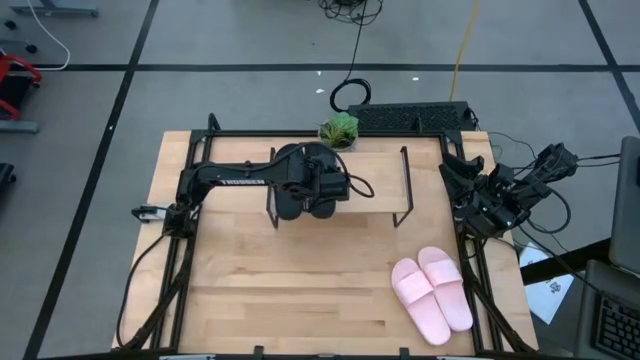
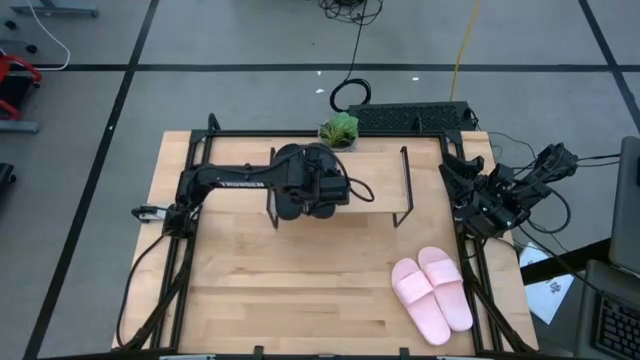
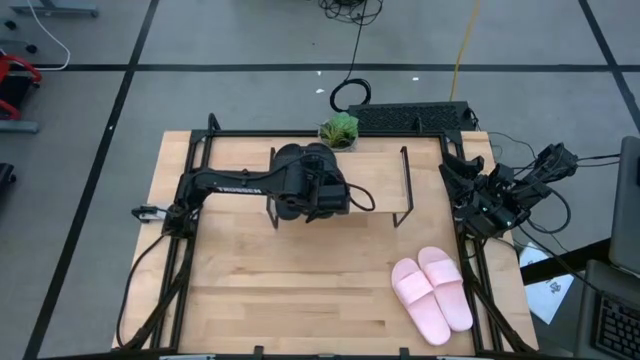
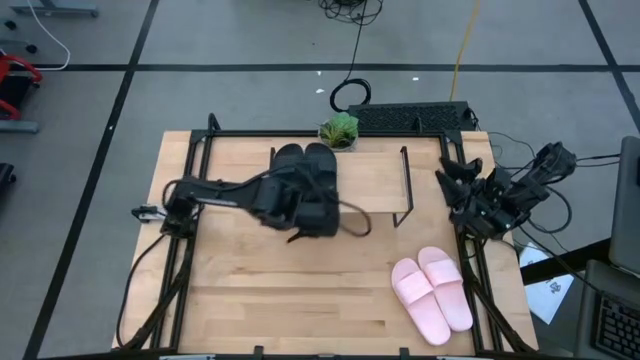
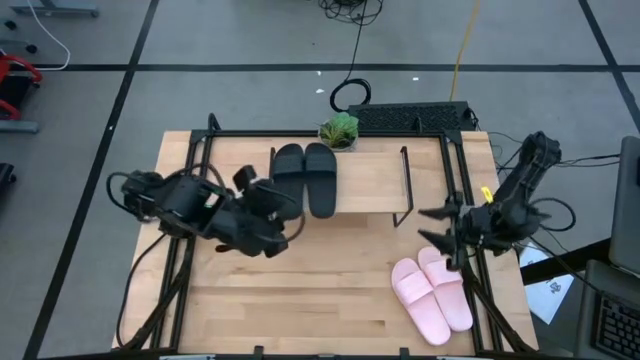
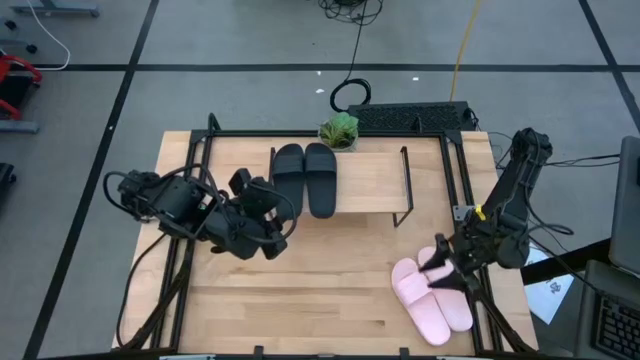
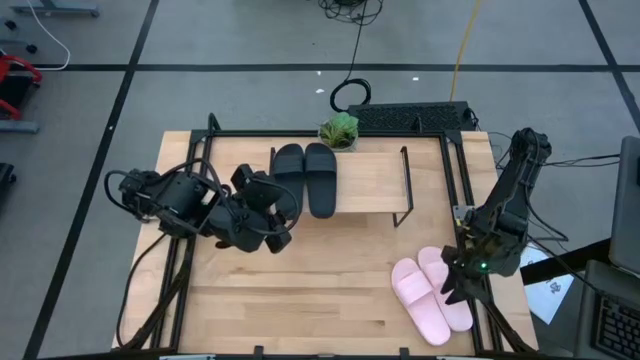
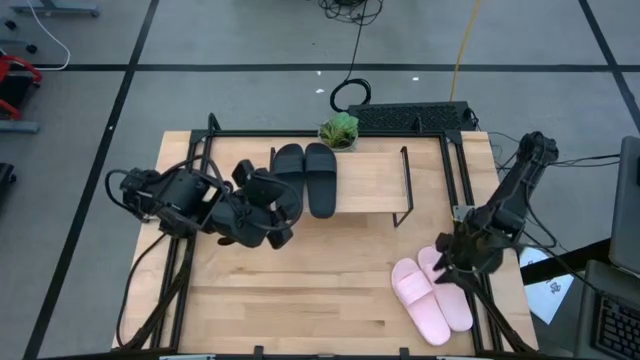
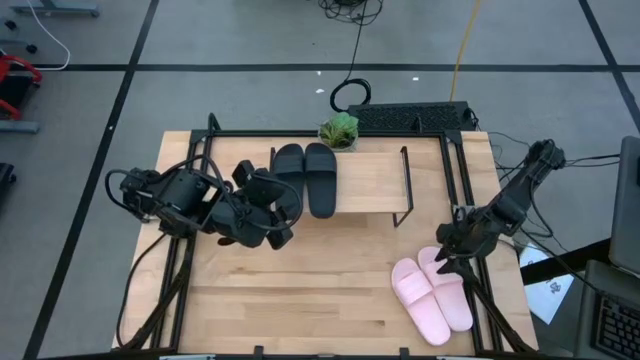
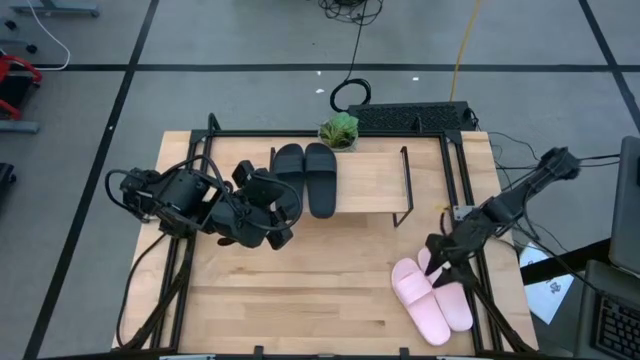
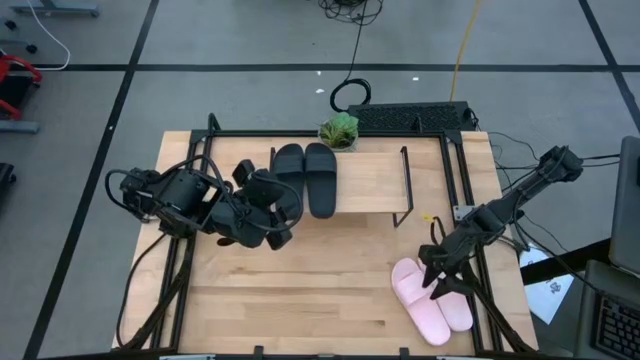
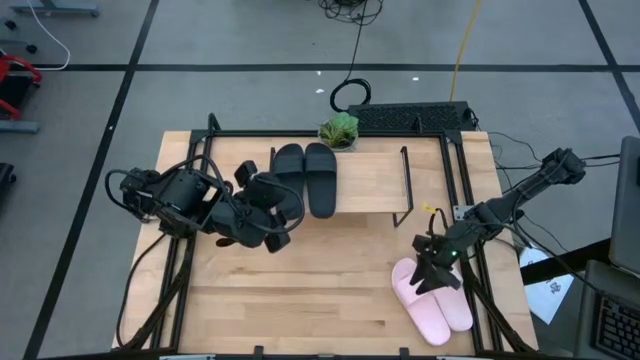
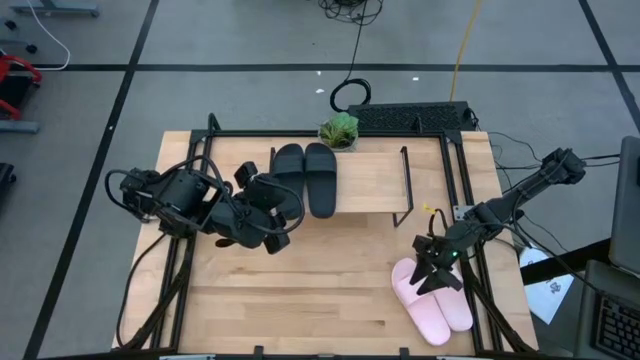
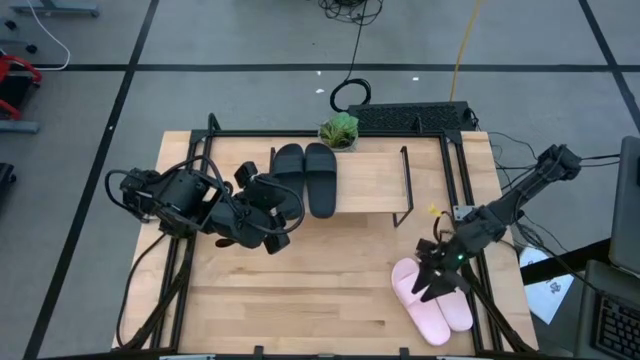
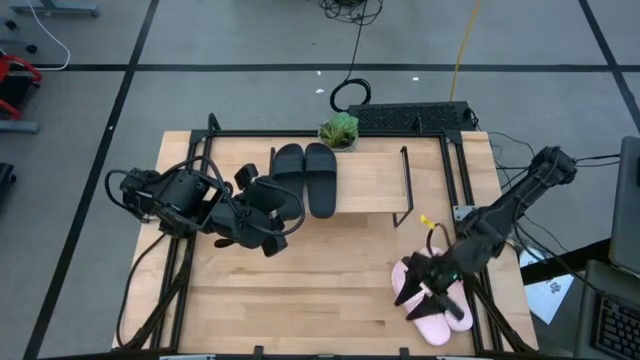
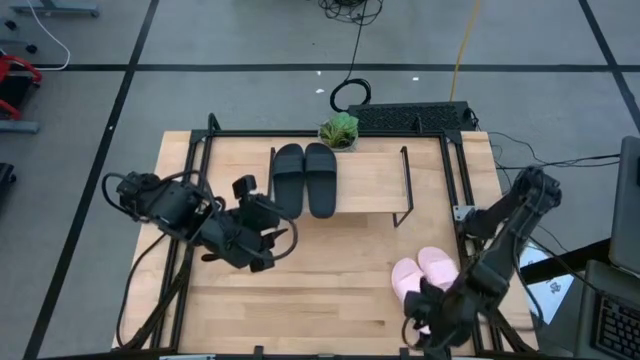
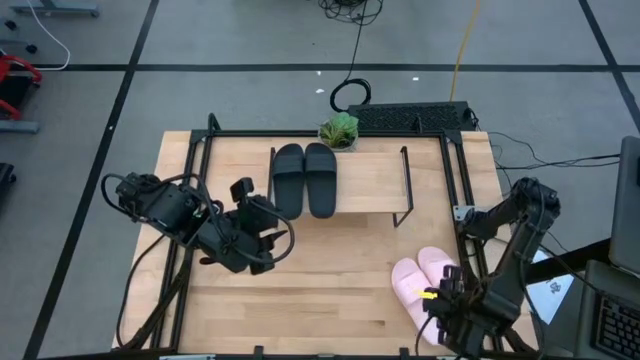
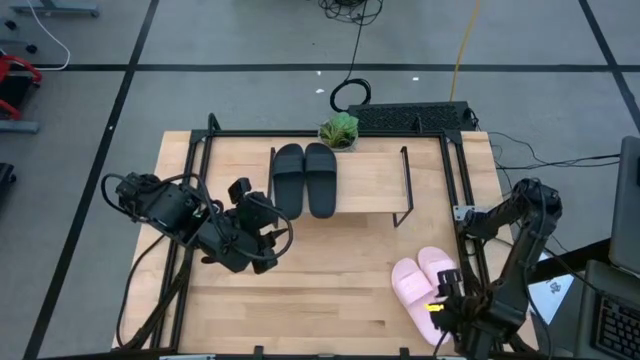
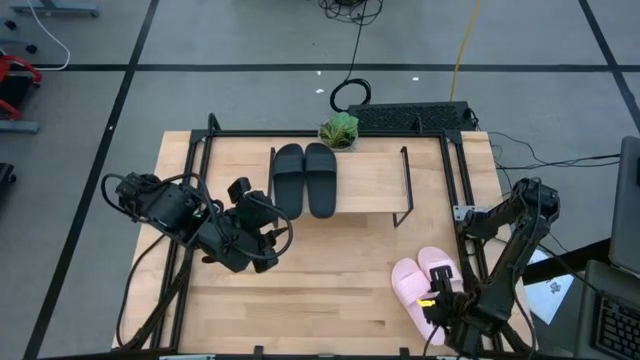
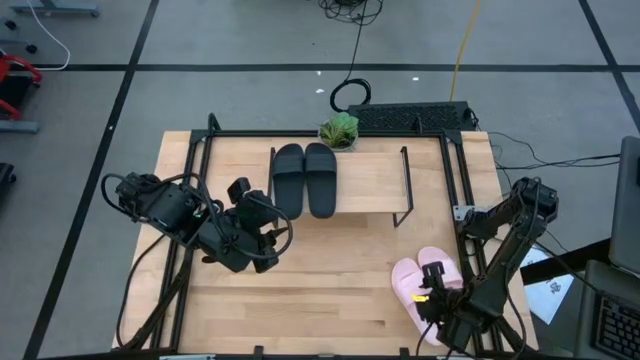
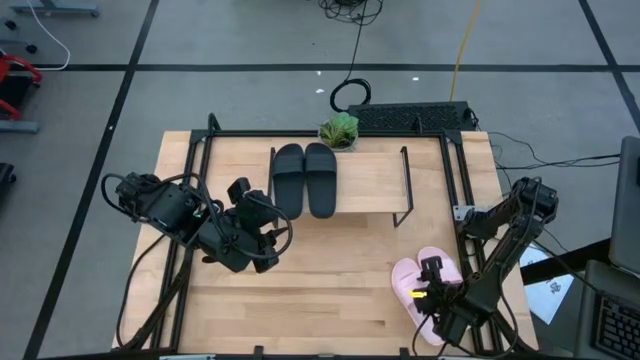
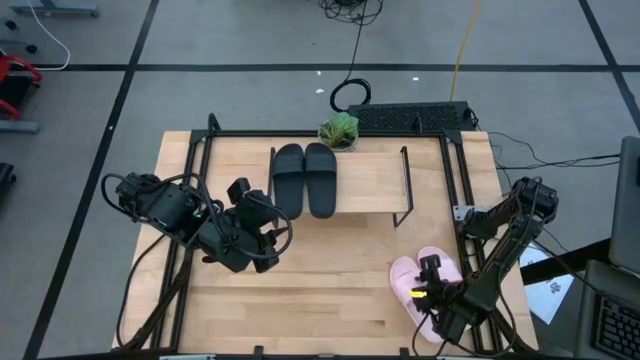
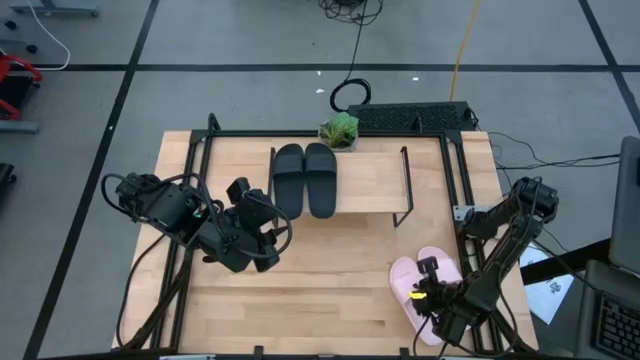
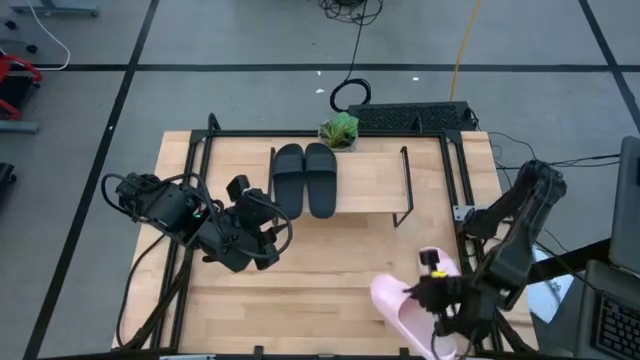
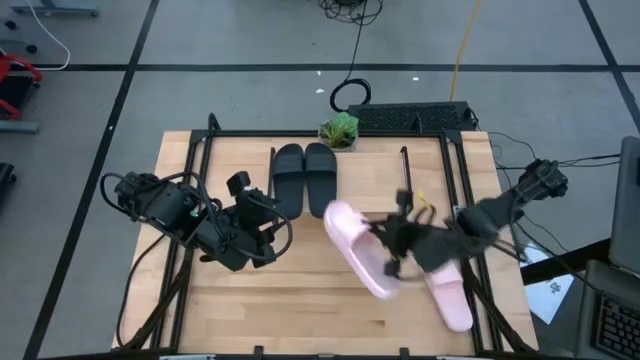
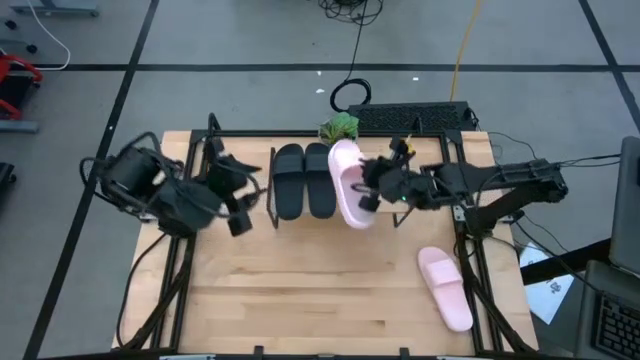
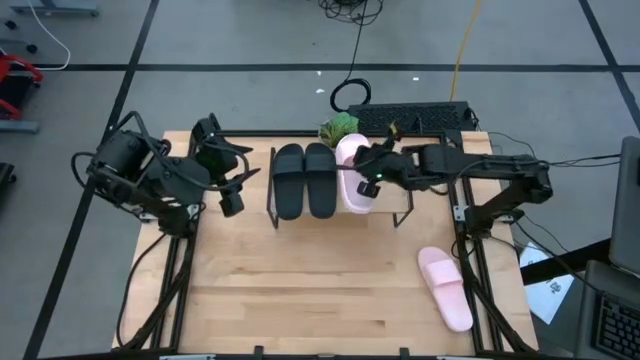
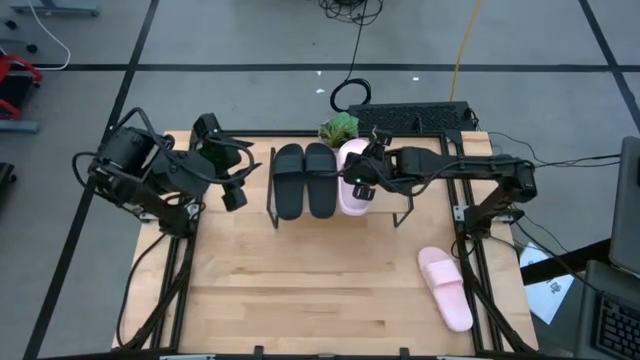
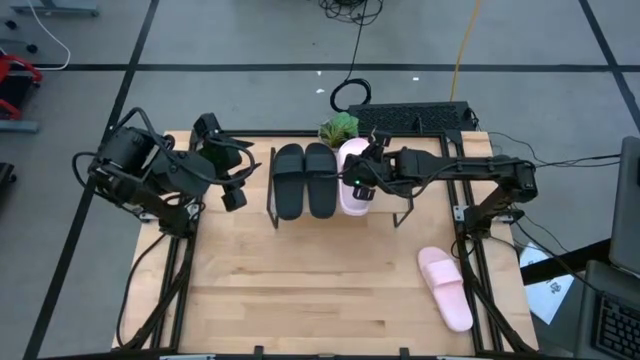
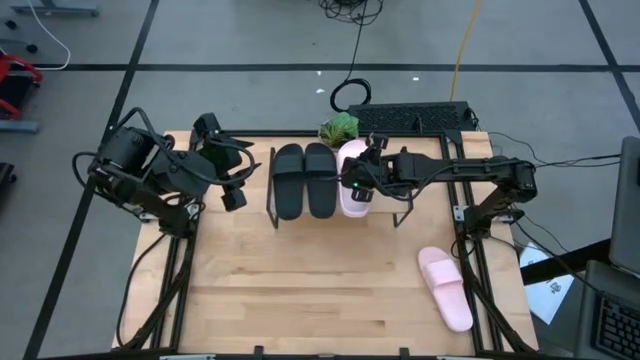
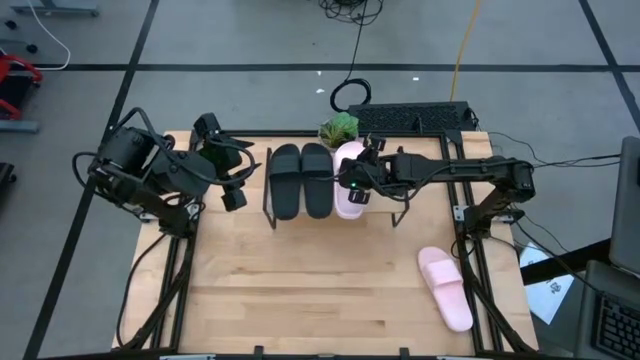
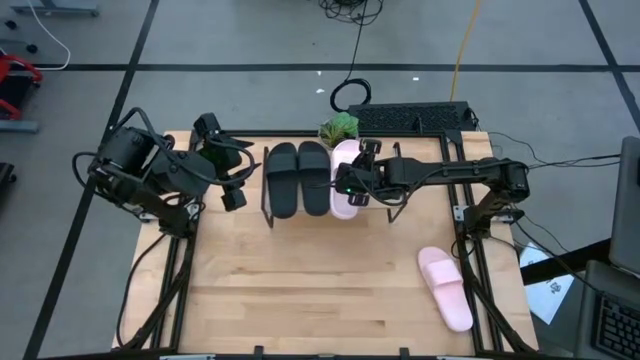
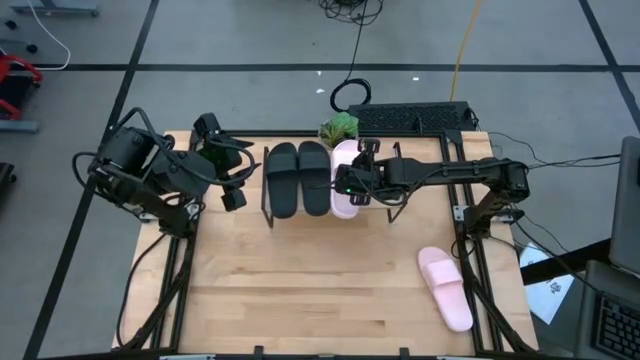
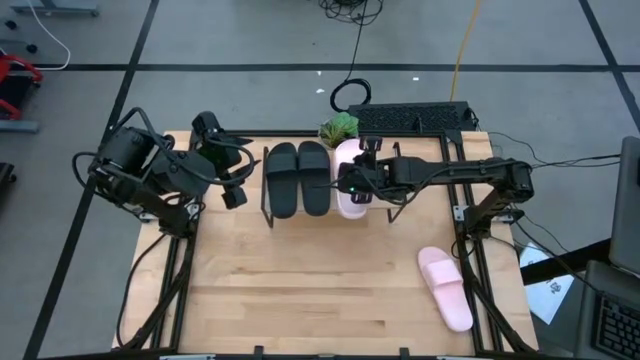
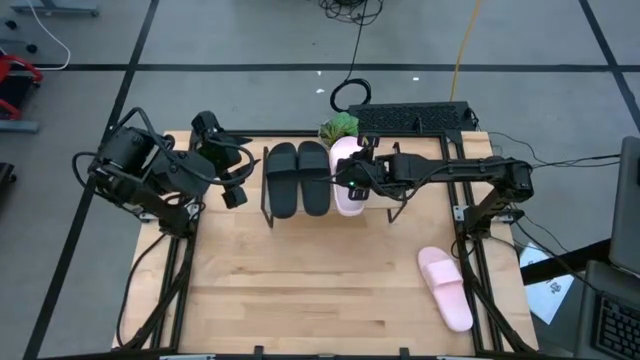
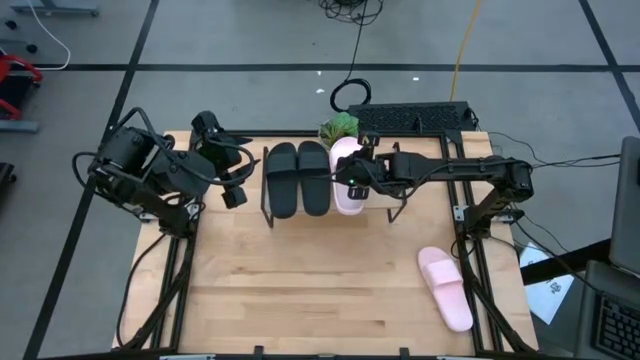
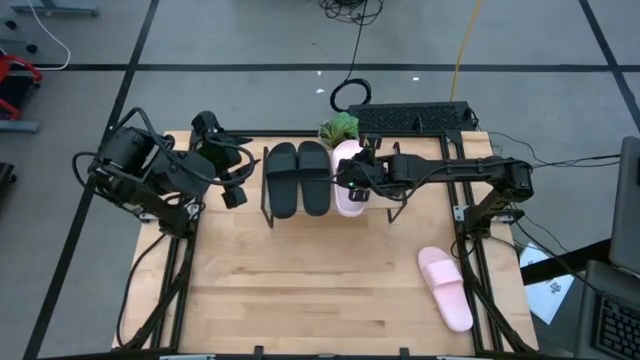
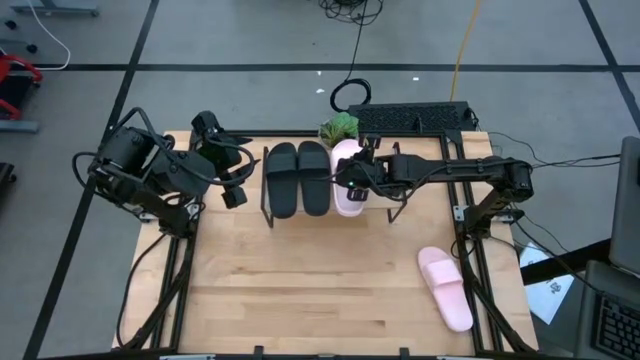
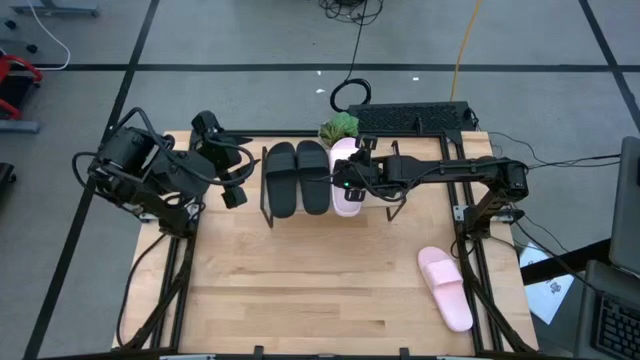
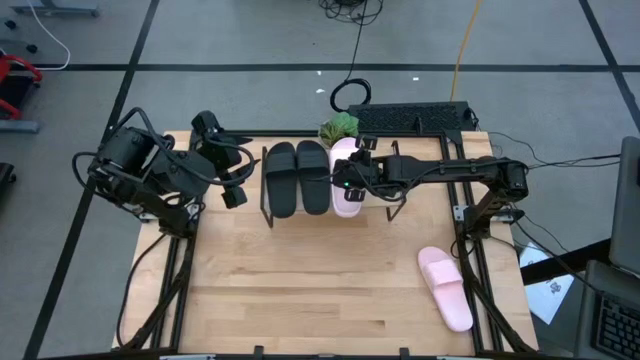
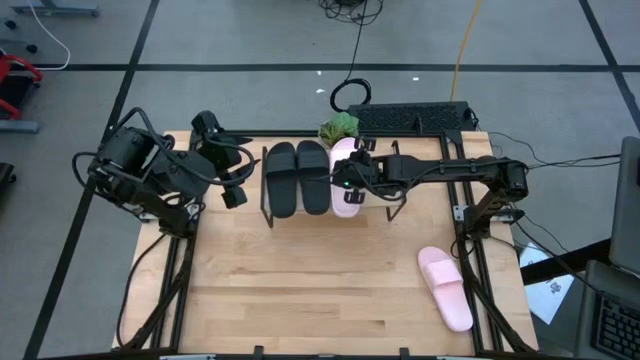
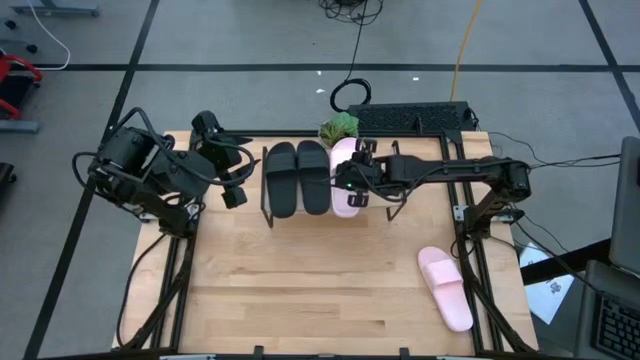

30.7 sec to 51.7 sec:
Task: Pick and place slides into the shelf
Put the left pink slipper on the shelf
